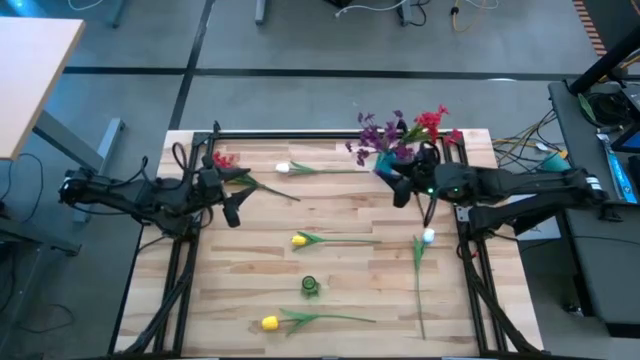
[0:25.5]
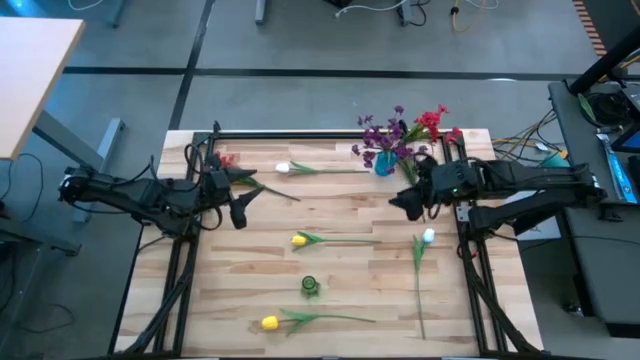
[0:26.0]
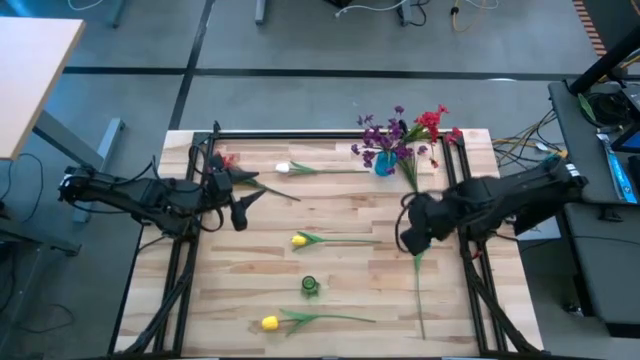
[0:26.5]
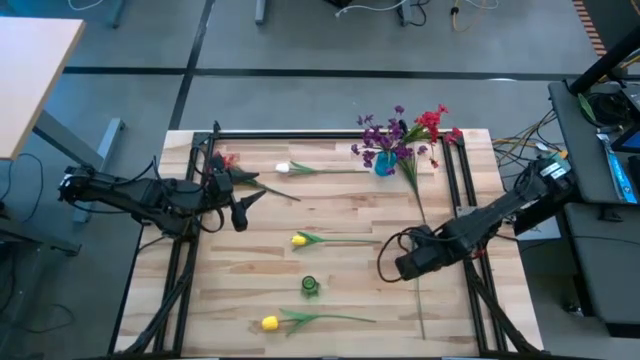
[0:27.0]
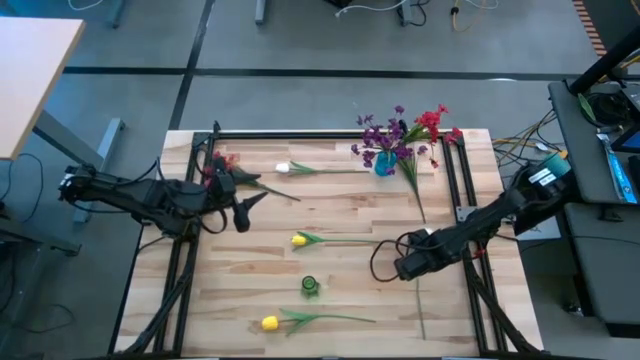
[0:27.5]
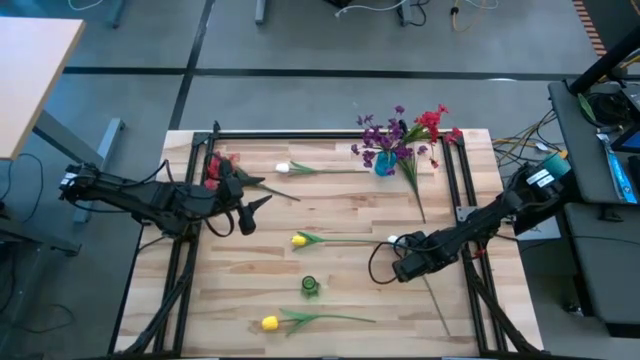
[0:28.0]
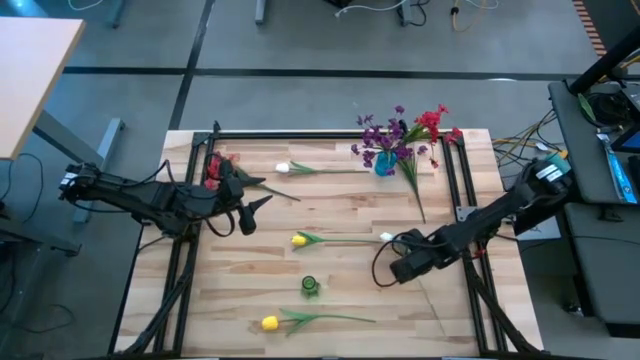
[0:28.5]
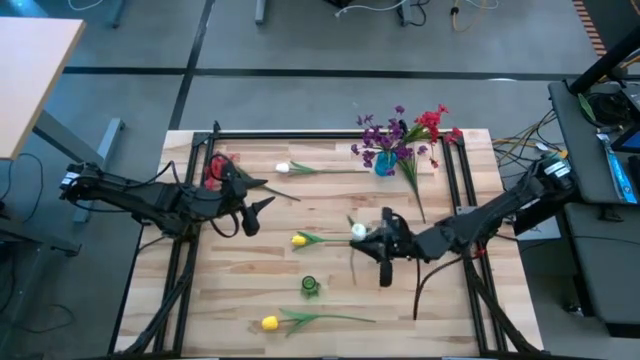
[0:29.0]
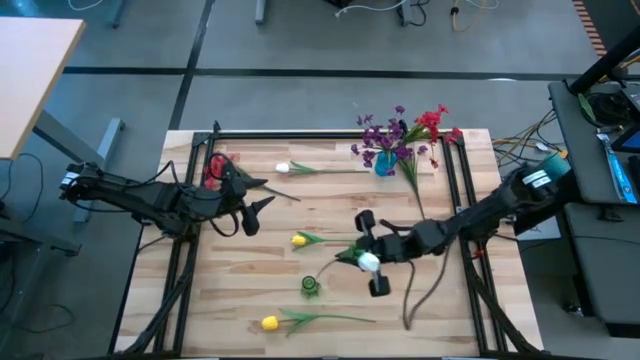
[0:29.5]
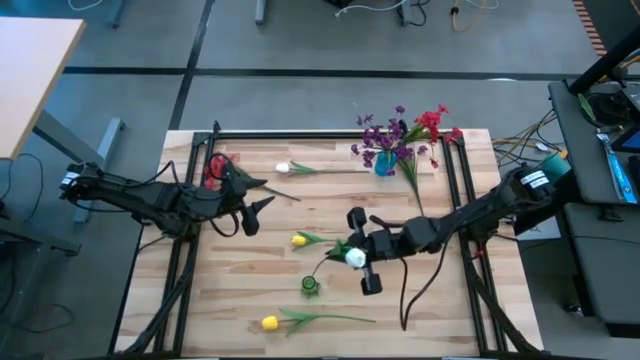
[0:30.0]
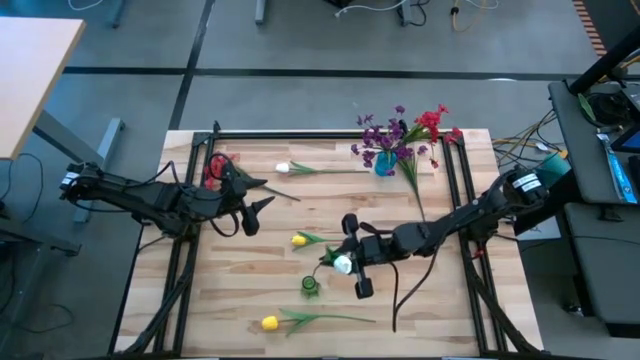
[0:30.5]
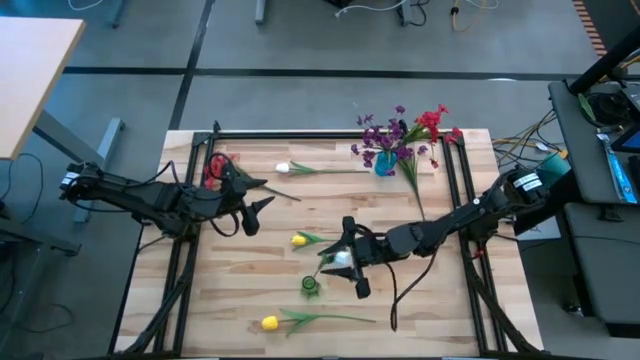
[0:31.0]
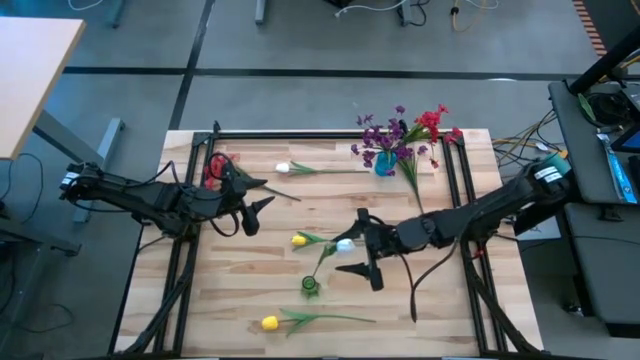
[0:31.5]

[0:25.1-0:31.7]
Task: Sort flowers into vase by color
Put the bottom white flower into the green vase

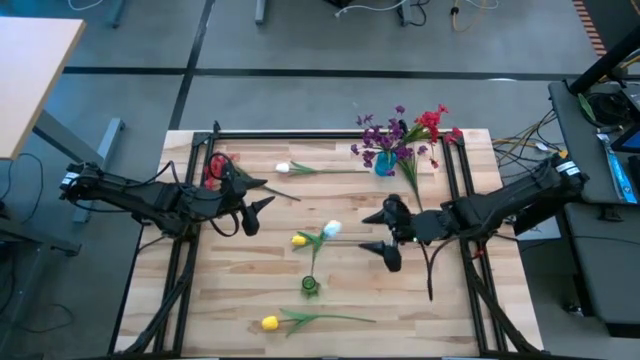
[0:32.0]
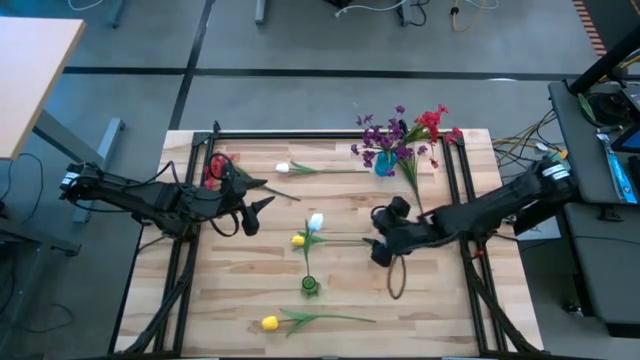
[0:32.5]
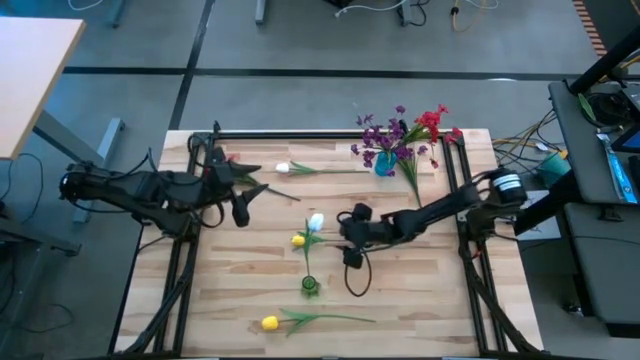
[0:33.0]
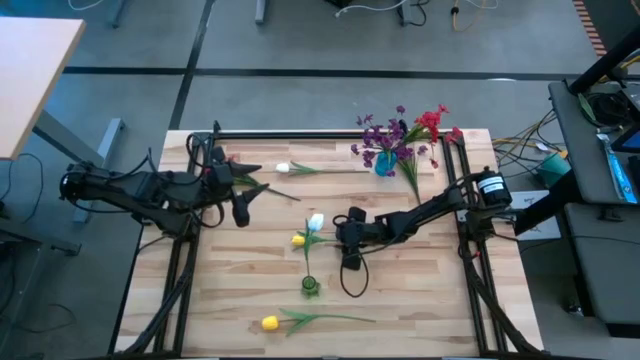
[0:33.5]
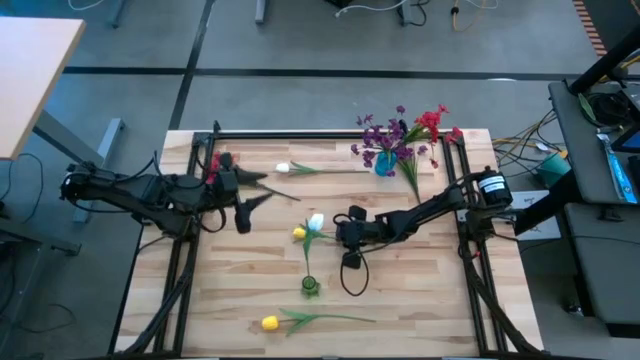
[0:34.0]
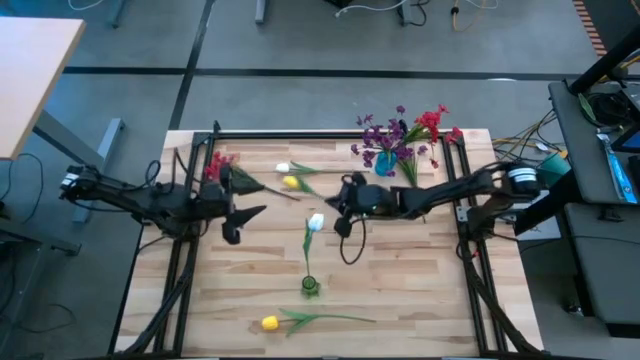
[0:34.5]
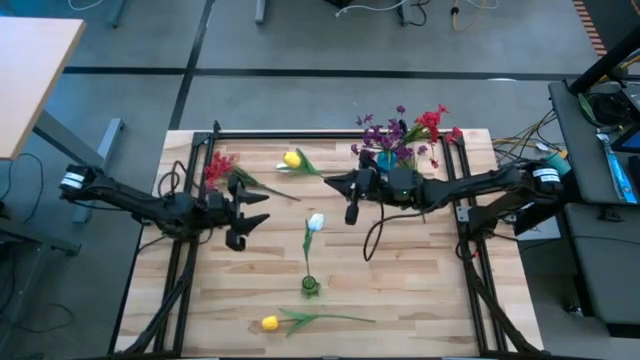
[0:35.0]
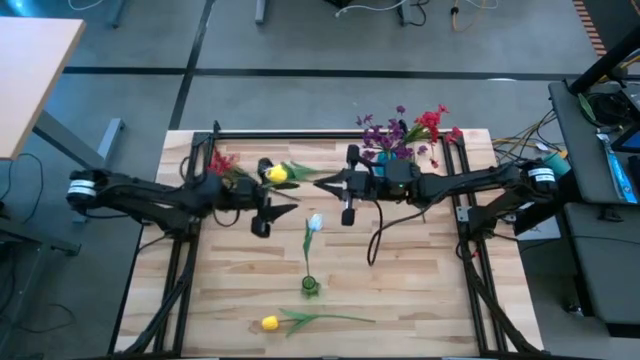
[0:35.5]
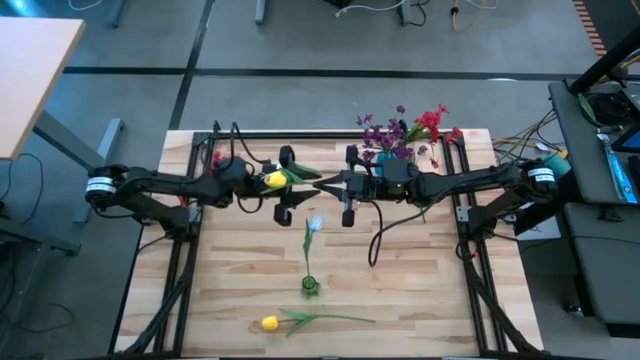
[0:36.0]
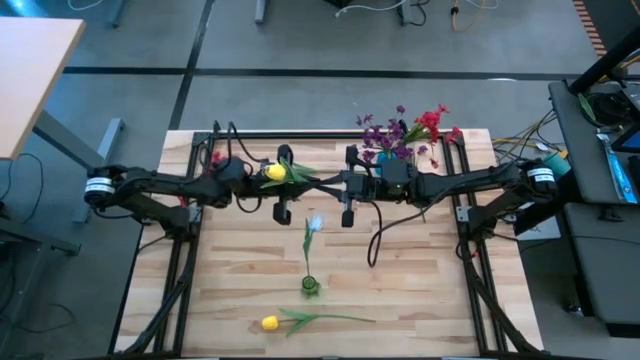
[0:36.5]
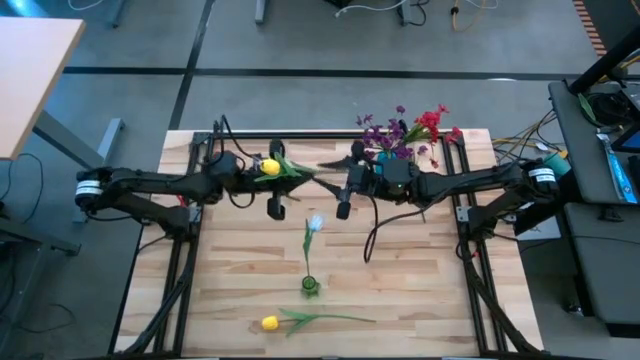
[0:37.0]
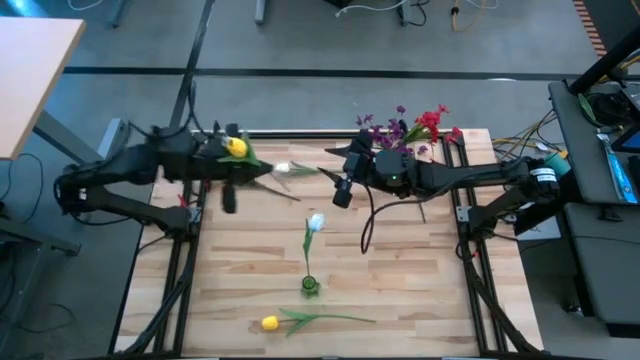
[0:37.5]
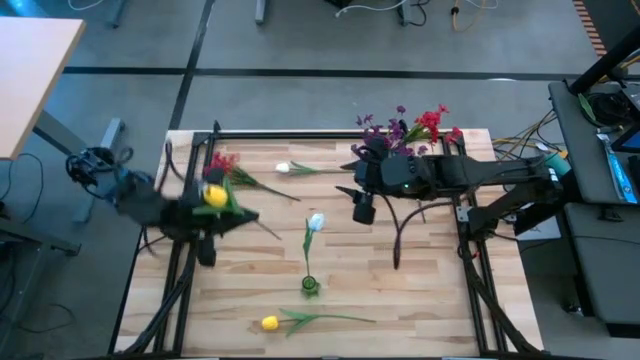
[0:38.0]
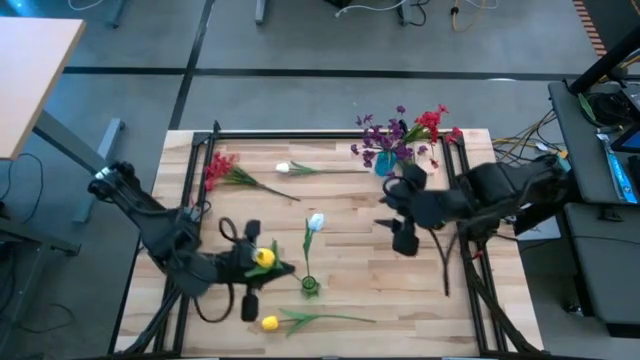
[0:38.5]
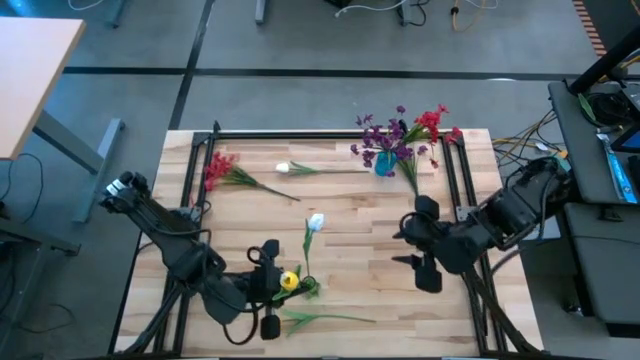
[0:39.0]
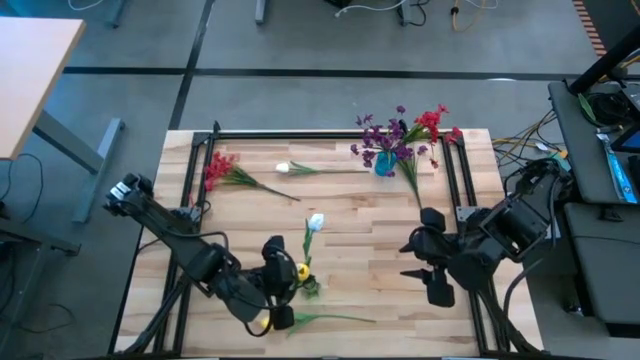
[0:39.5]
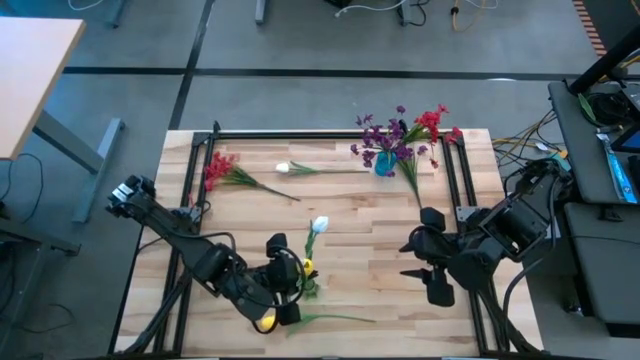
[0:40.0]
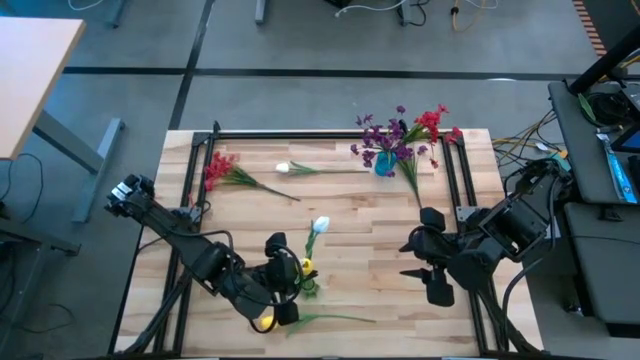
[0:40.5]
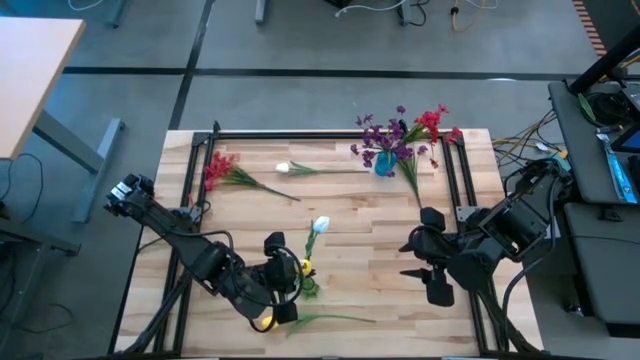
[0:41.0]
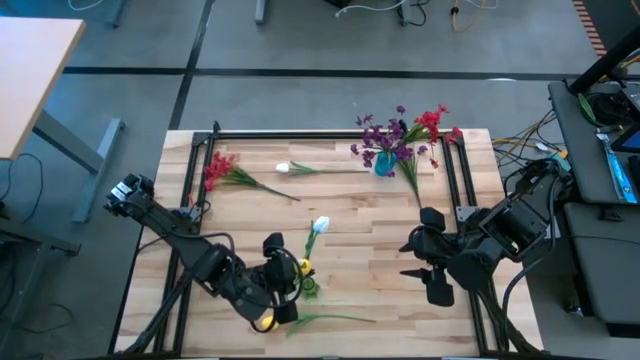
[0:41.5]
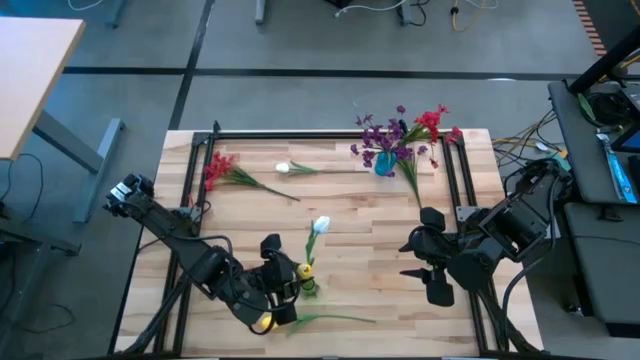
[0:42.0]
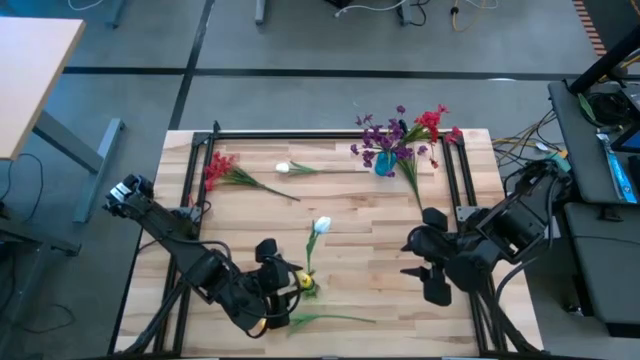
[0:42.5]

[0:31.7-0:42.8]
Put the top yellow flower into the green vase
